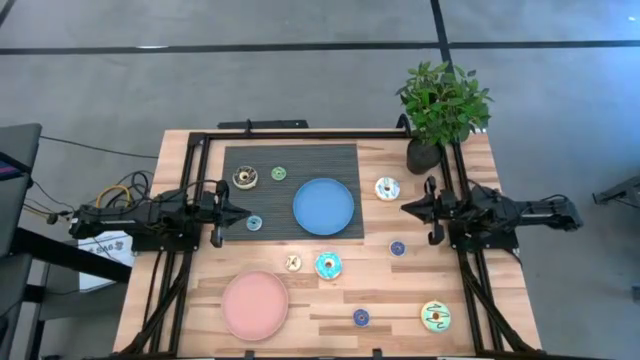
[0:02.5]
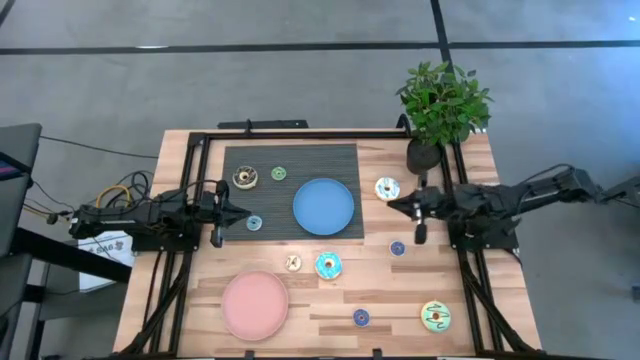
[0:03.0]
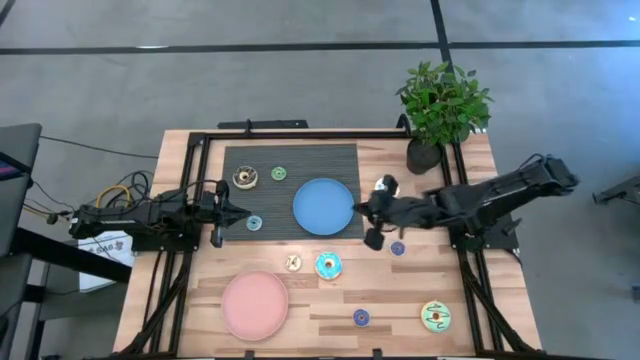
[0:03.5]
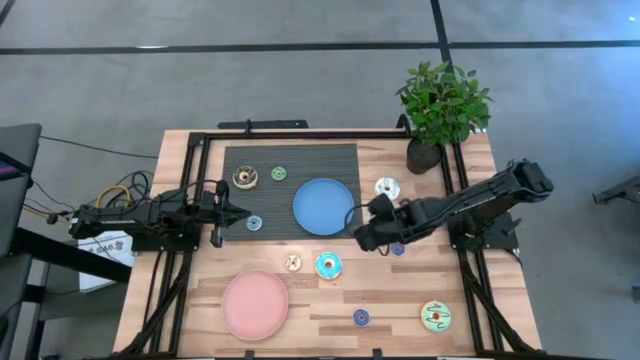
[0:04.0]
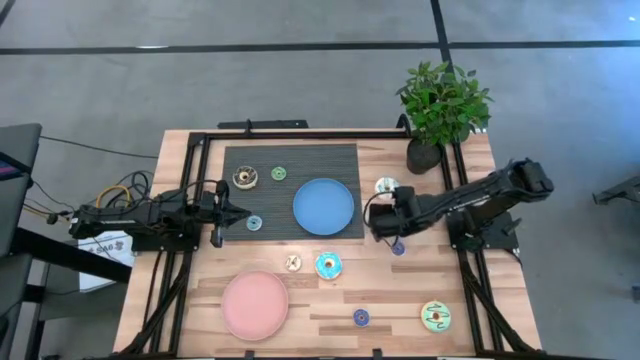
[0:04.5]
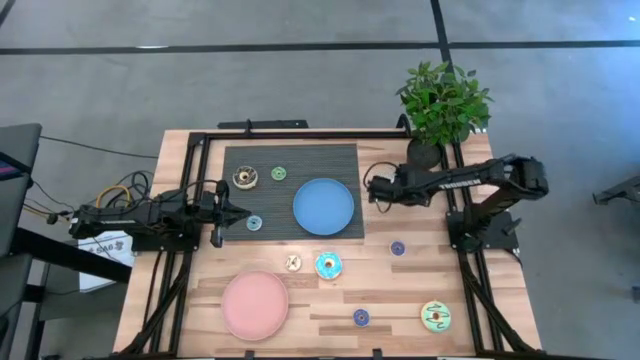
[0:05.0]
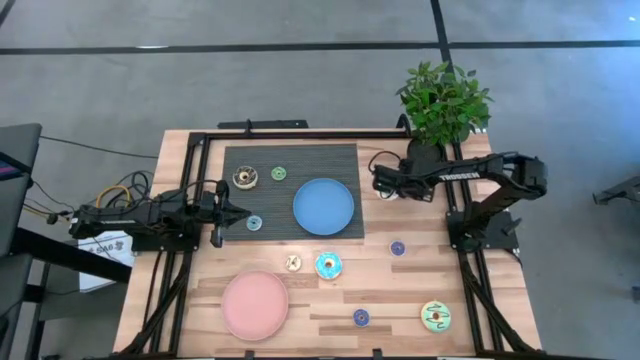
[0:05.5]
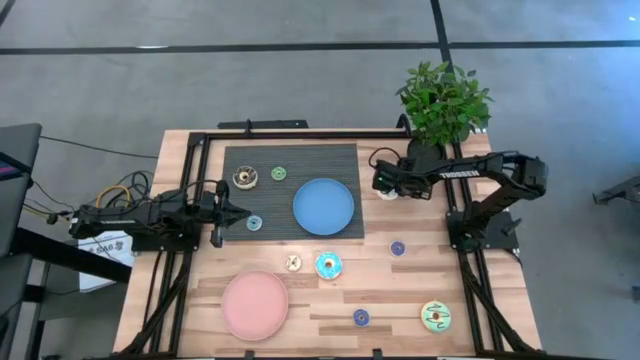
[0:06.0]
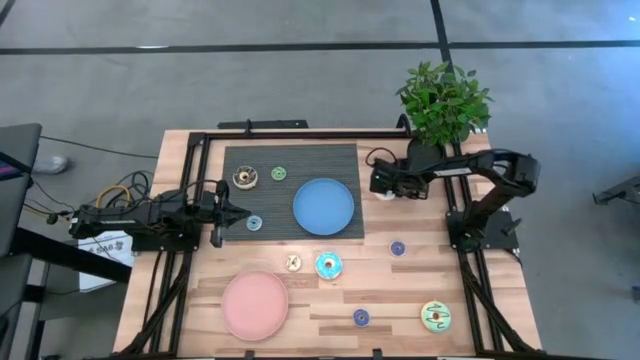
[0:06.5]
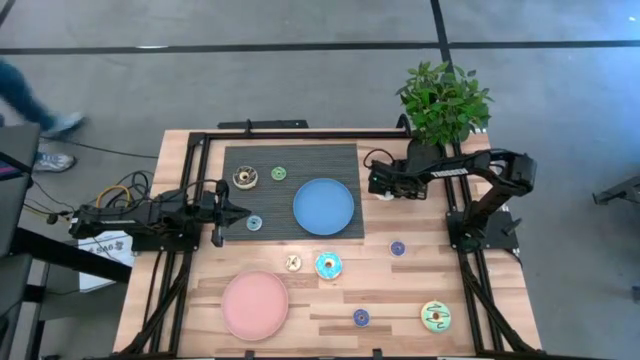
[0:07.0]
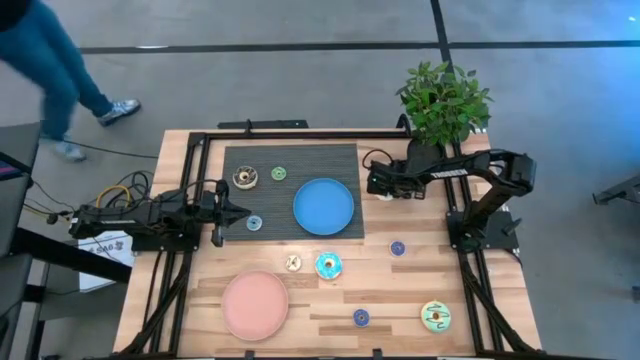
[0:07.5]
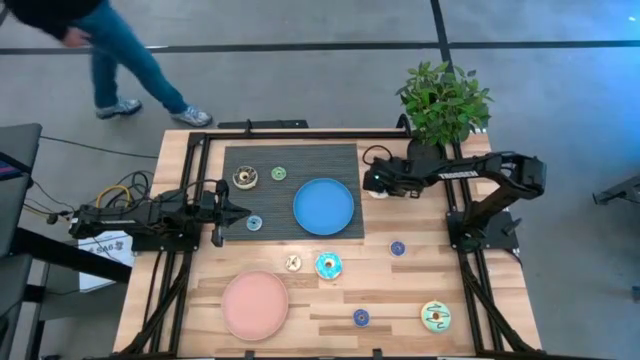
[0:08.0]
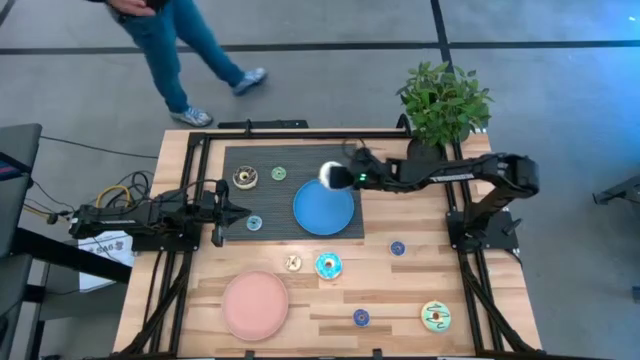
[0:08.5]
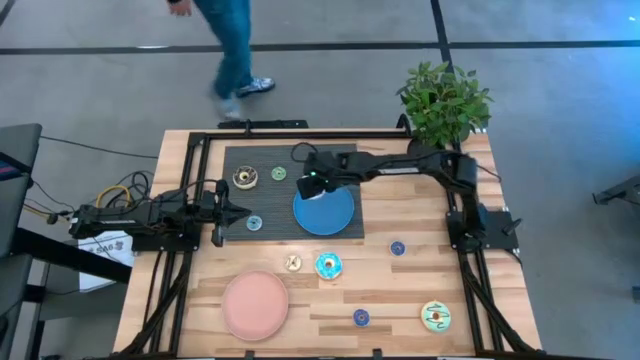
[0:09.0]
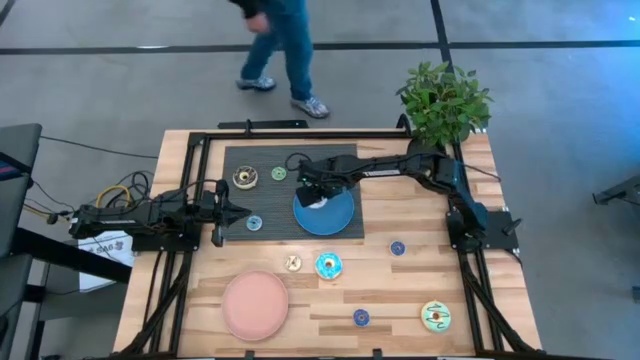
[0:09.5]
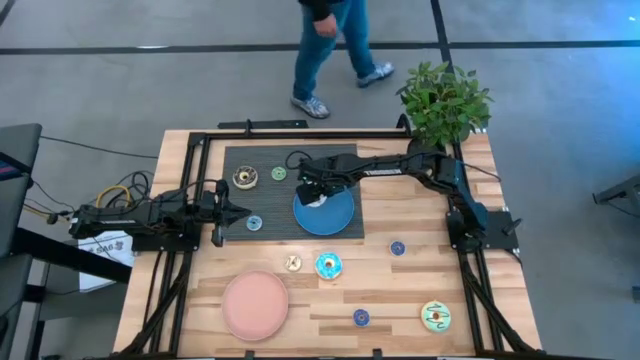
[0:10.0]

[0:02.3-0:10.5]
Task: Pick & Place donuts
Put the large white donut on the blue plate

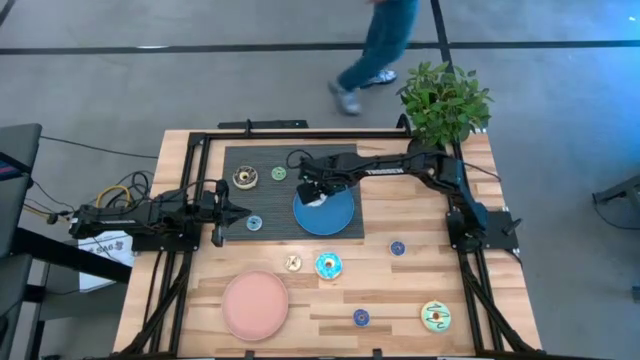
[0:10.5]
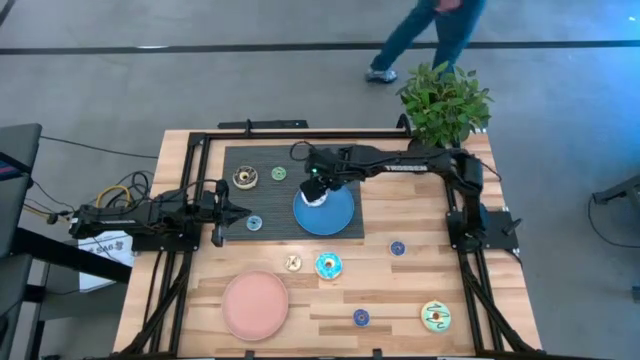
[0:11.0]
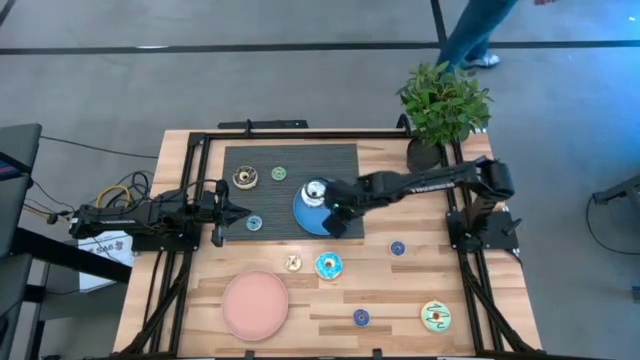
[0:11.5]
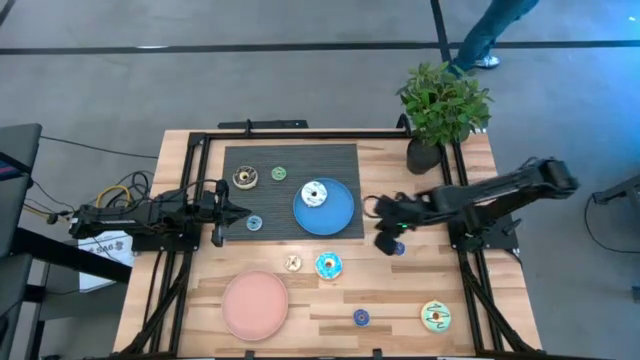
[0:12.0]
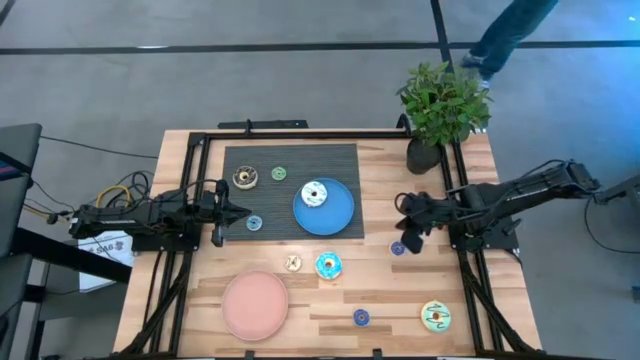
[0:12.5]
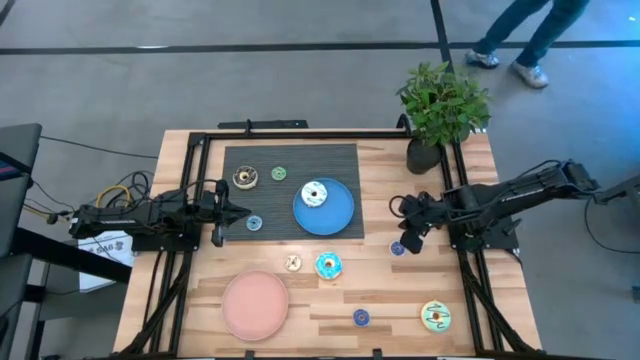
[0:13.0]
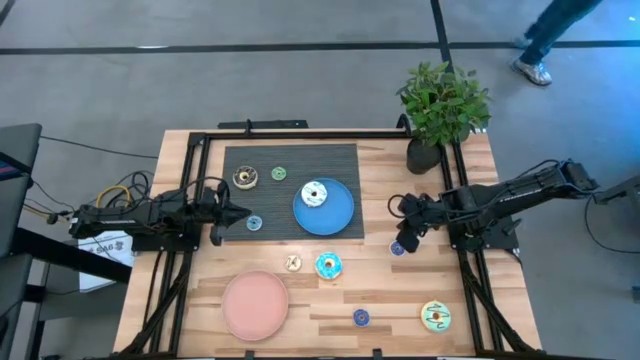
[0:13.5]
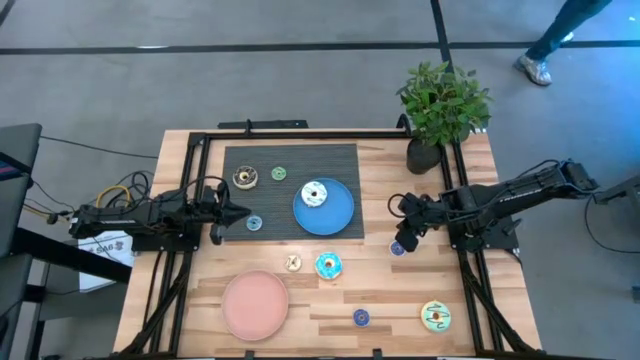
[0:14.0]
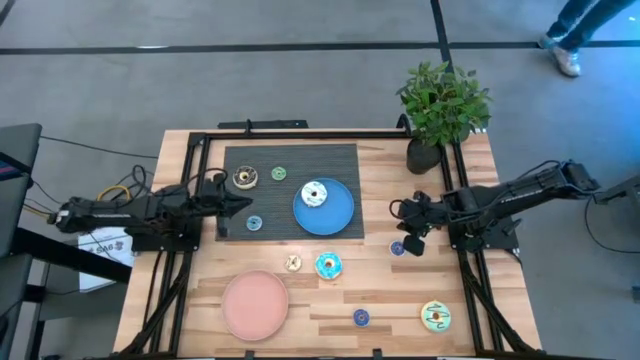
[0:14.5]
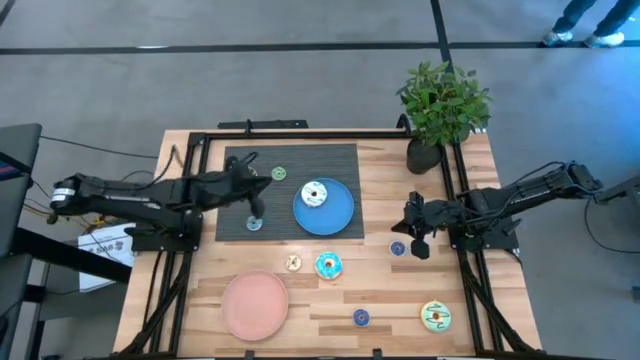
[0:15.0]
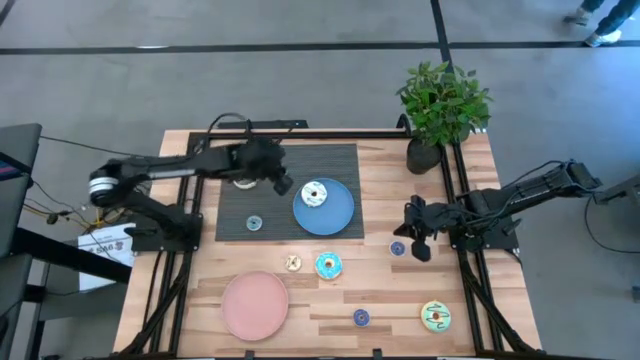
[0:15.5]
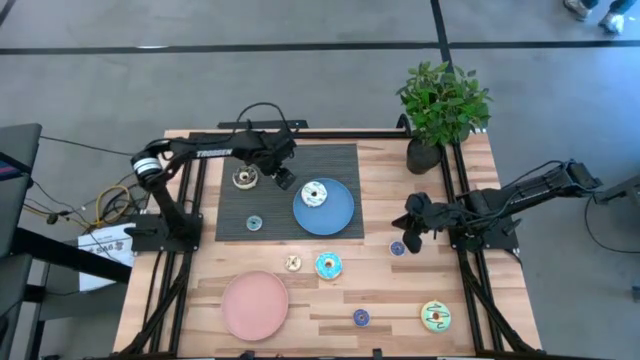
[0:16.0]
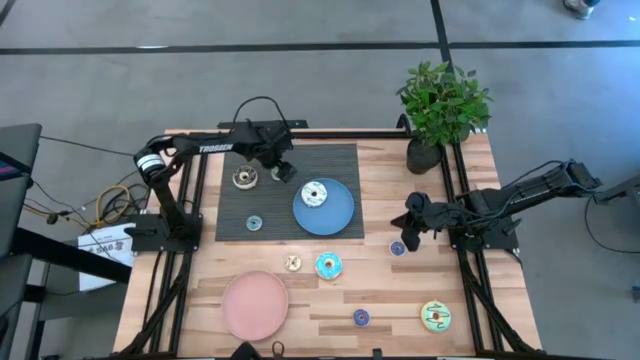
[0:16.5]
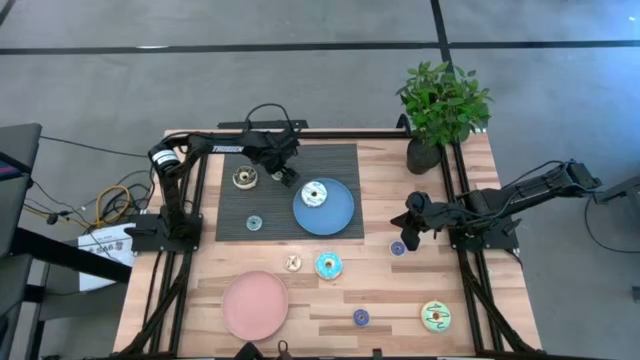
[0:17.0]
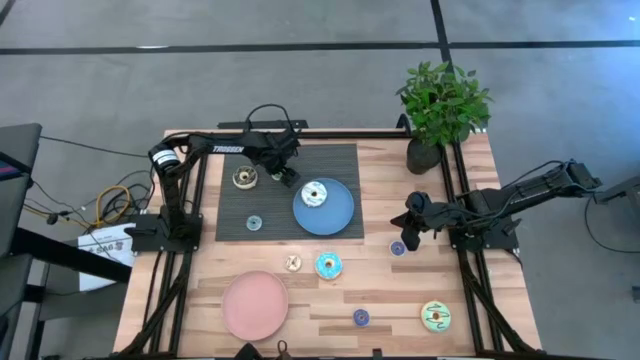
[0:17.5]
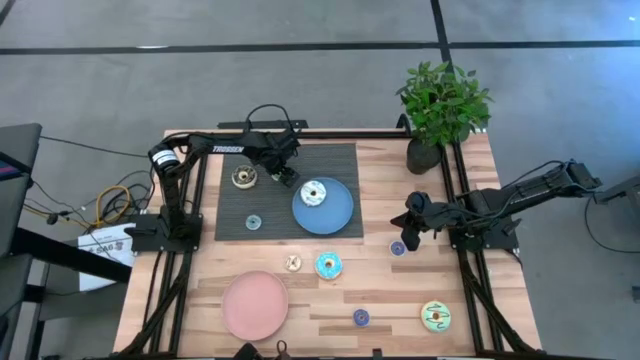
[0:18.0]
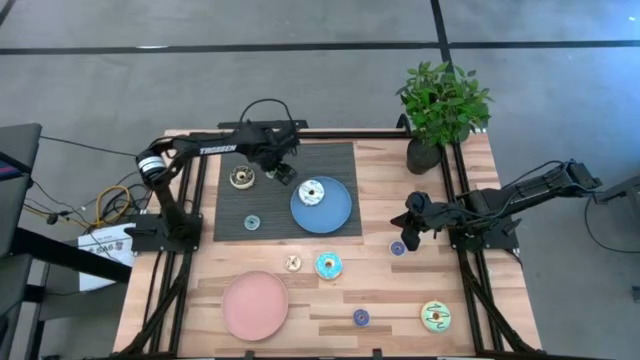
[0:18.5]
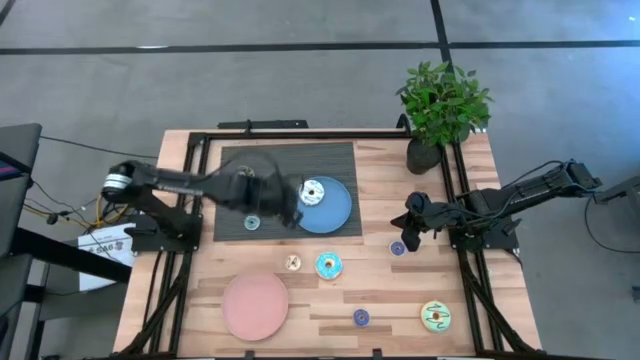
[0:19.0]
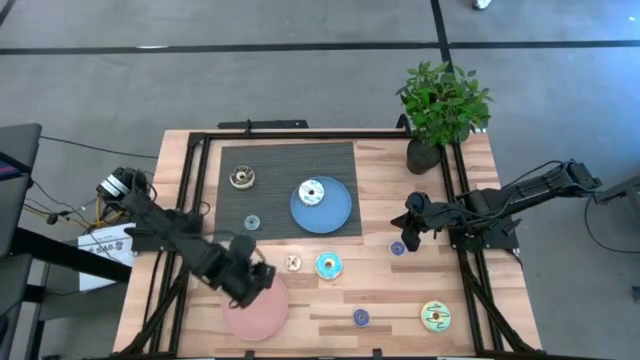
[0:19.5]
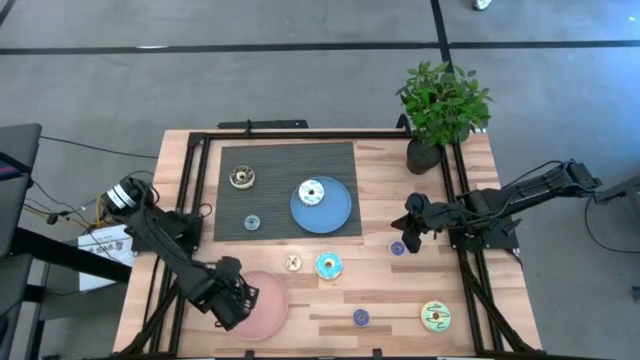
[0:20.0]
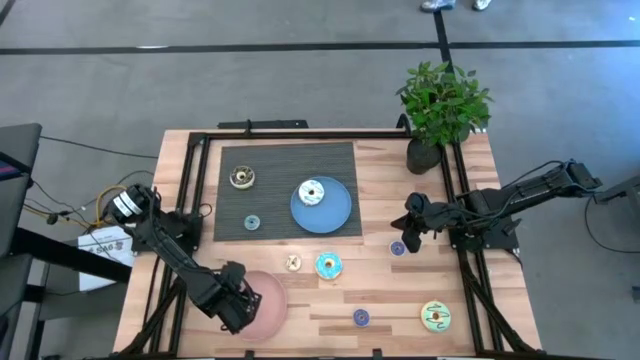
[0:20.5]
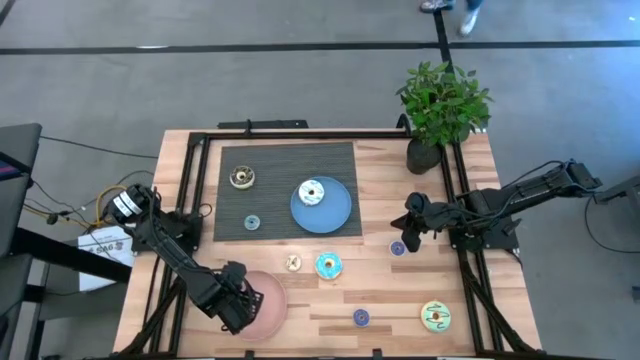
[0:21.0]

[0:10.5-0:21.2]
Put the small green donut on the pink plate
